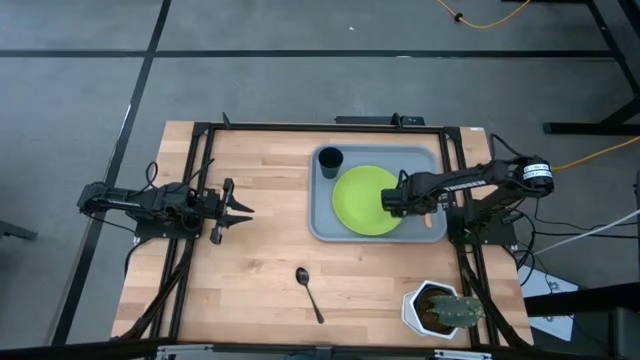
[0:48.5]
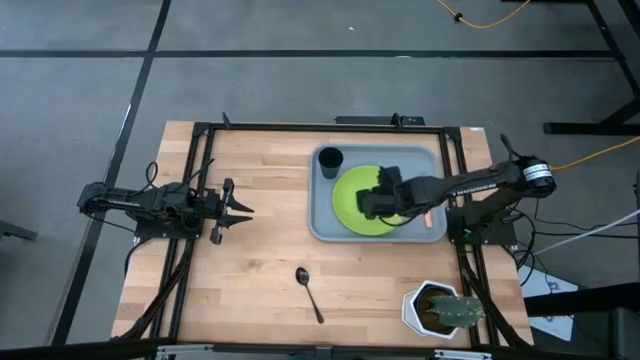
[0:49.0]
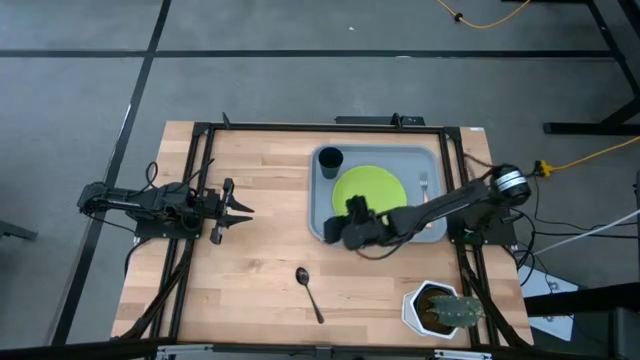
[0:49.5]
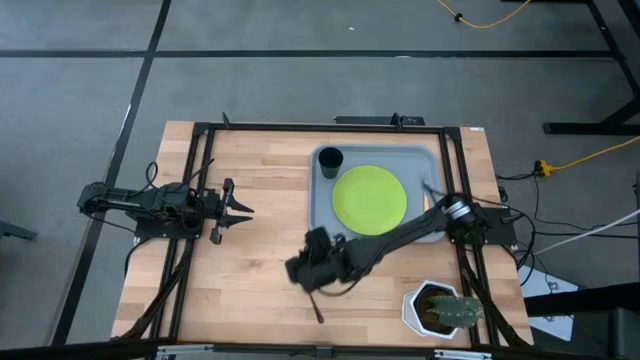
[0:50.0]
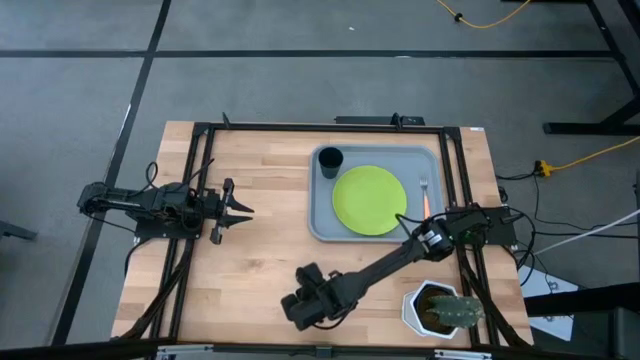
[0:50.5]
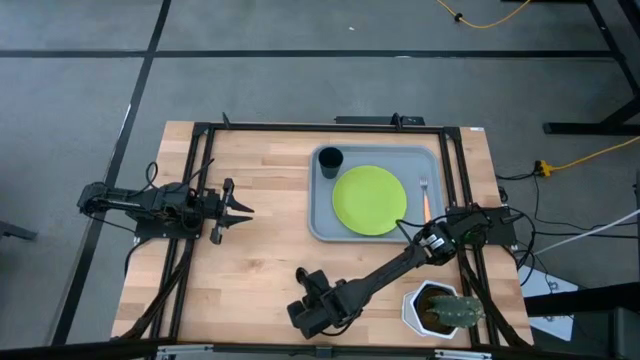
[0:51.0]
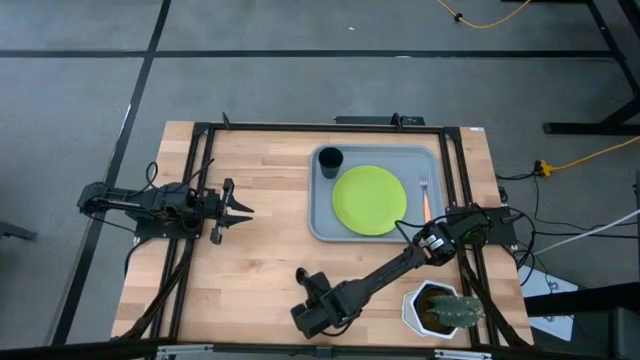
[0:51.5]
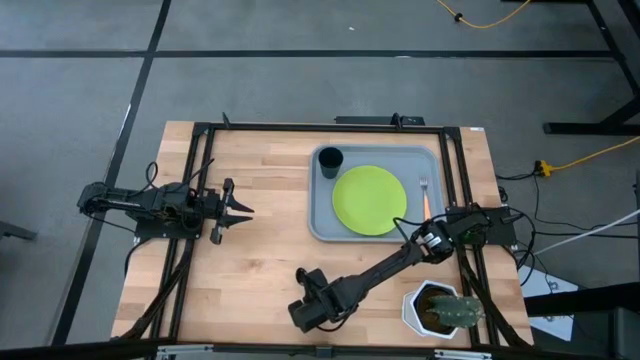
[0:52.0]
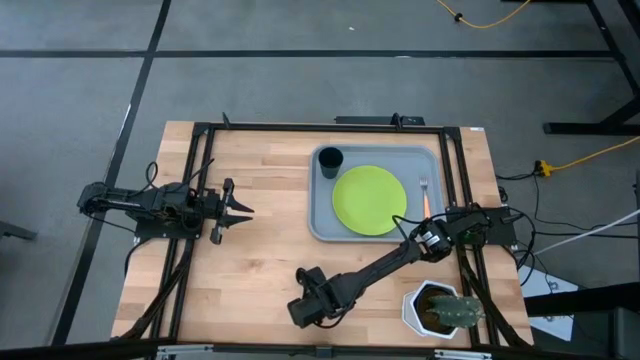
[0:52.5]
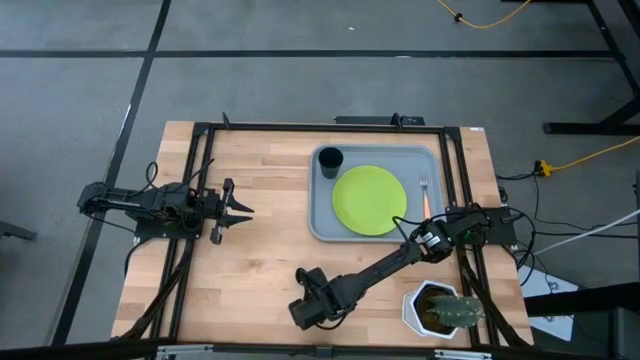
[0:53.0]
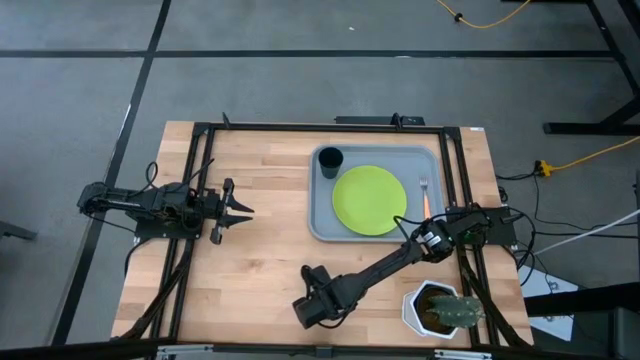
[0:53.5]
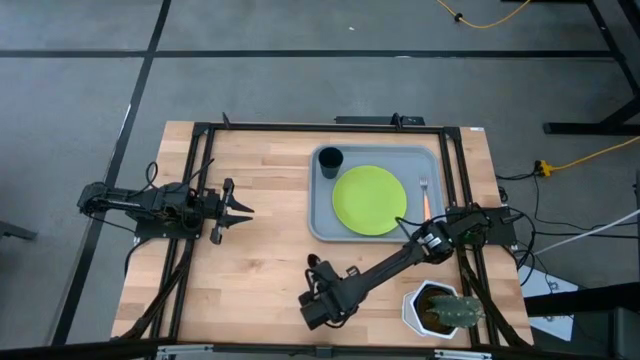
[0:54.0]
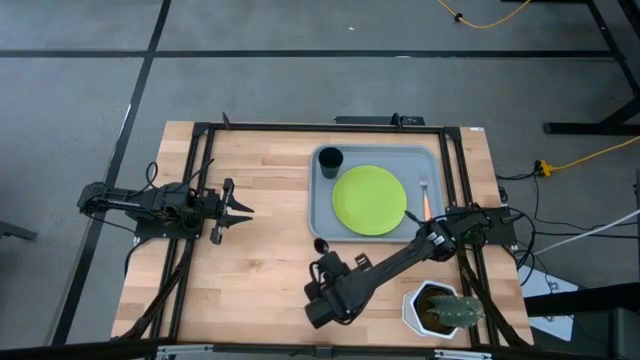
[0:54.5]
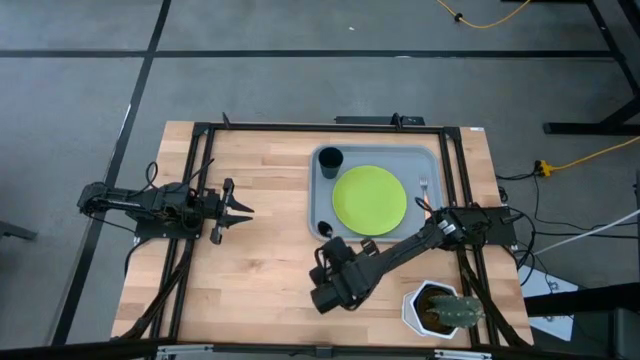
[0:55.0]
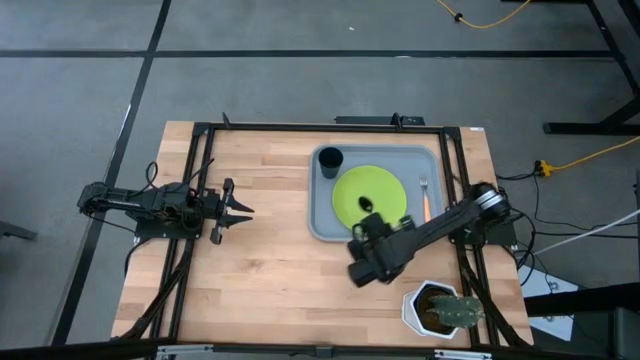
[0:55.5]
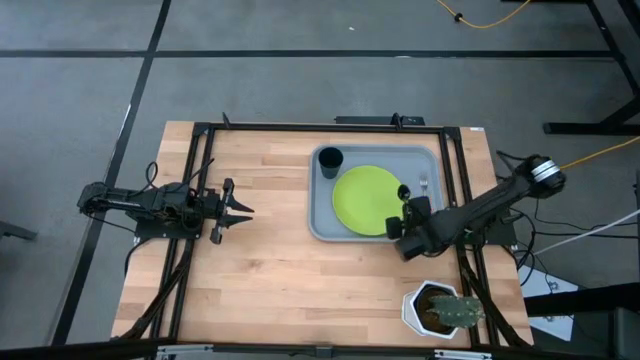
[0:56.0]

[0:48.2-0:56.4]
Task: Pick and place plate/cup/fork/spoon on tray
Put the black spoon on the gray serving tray to the right of the light green plate

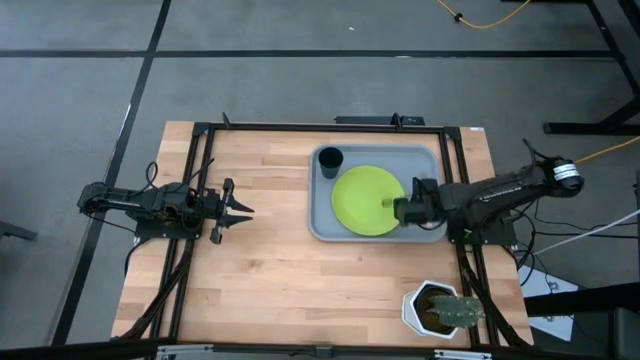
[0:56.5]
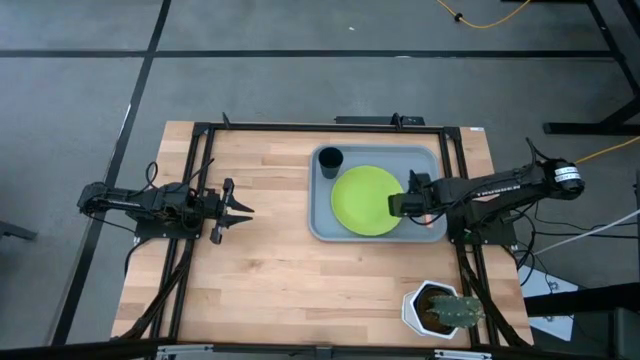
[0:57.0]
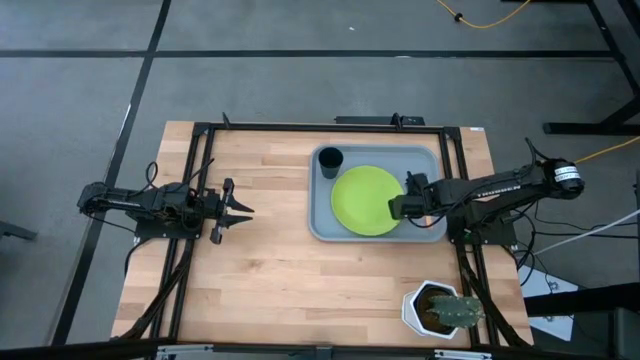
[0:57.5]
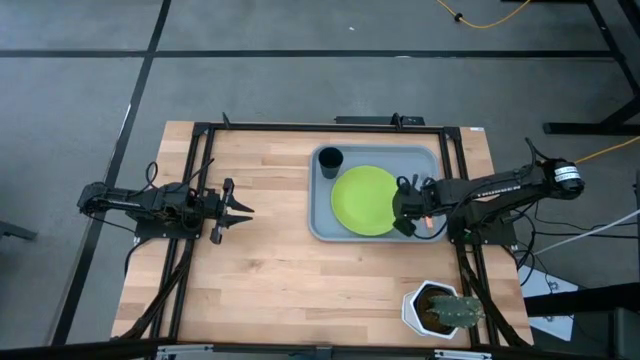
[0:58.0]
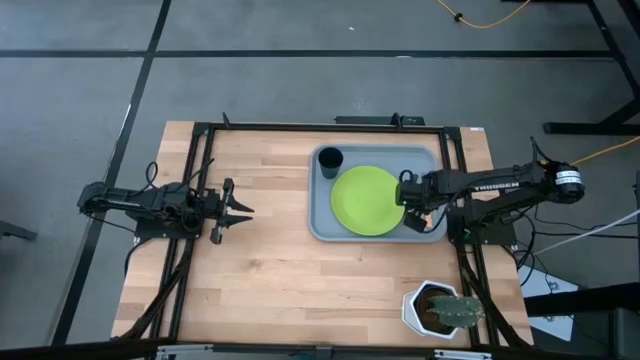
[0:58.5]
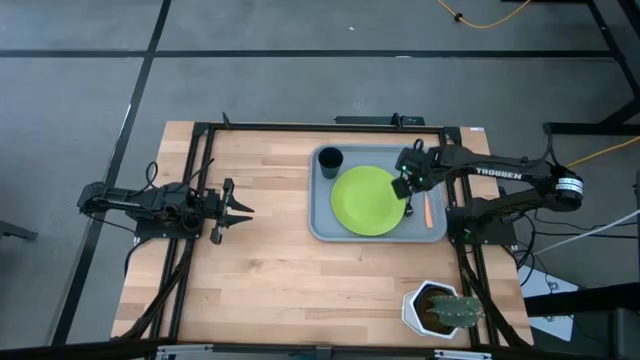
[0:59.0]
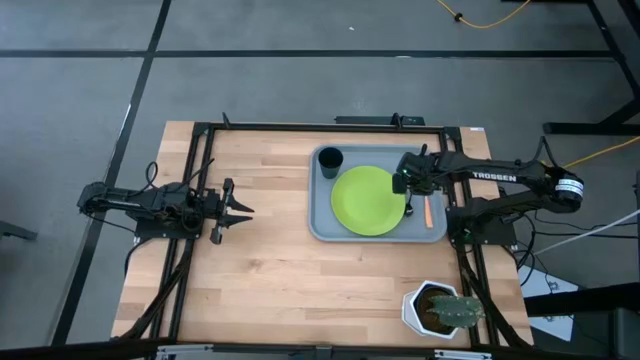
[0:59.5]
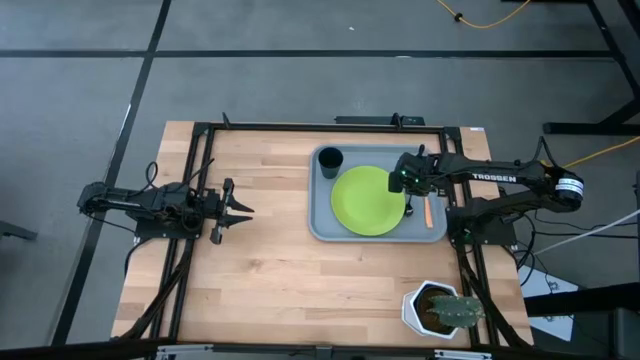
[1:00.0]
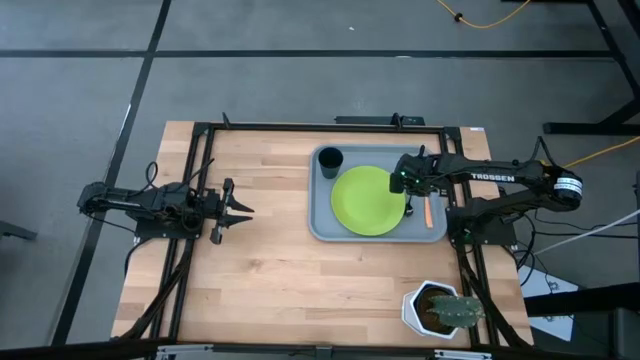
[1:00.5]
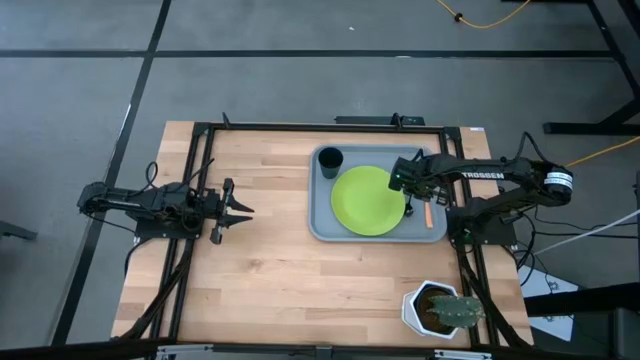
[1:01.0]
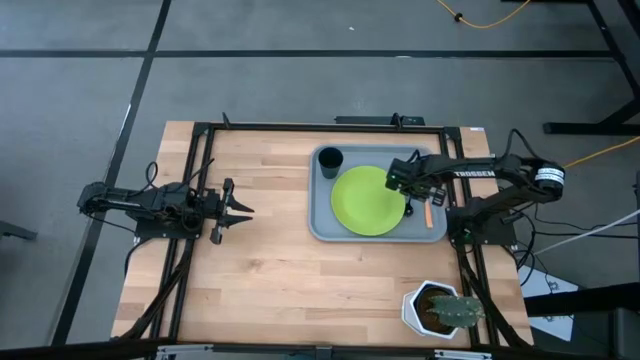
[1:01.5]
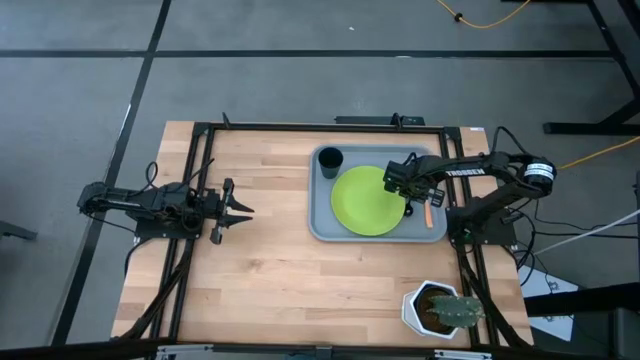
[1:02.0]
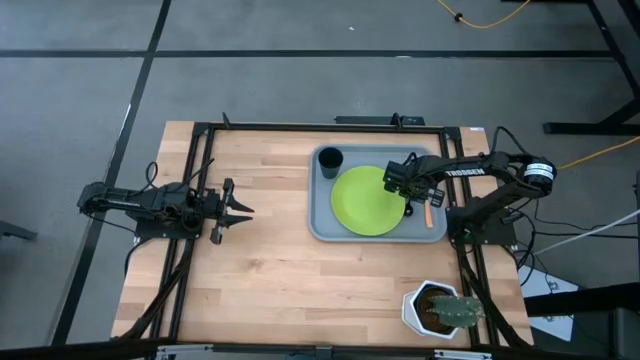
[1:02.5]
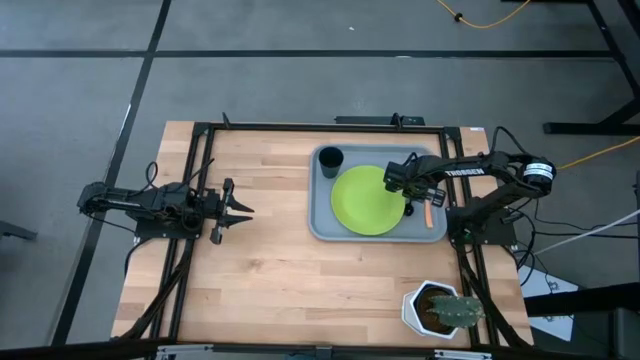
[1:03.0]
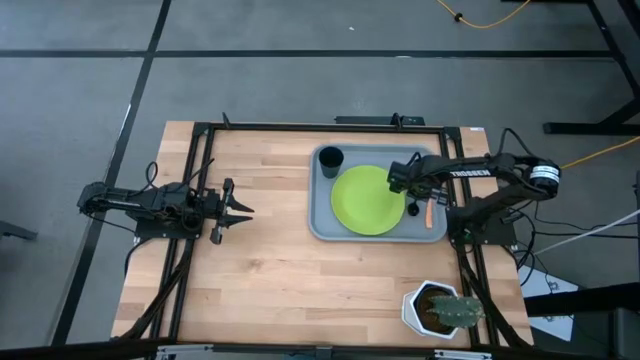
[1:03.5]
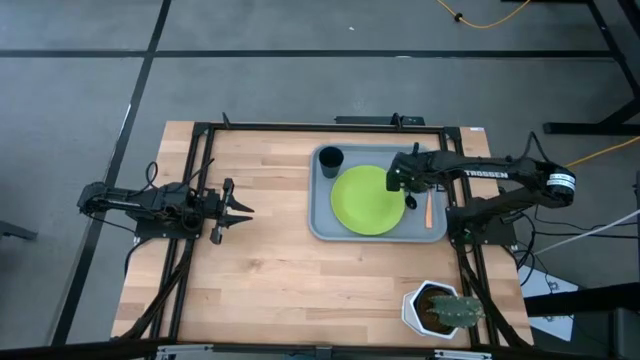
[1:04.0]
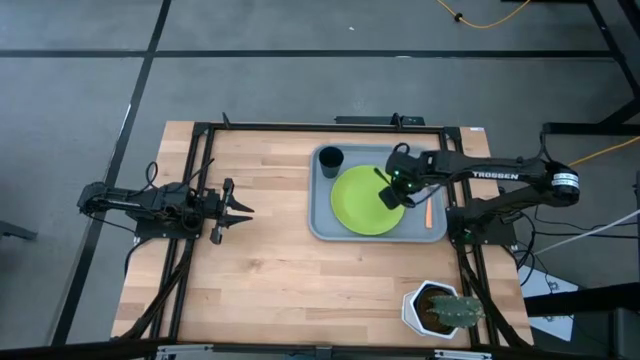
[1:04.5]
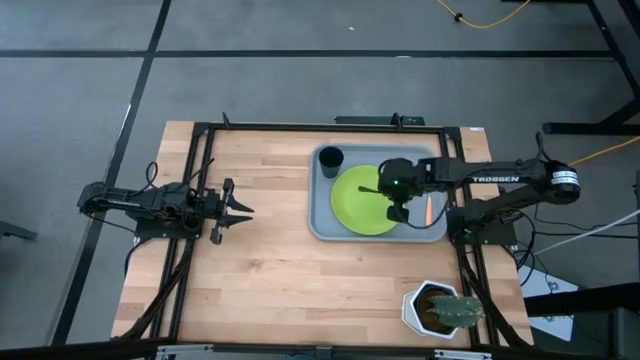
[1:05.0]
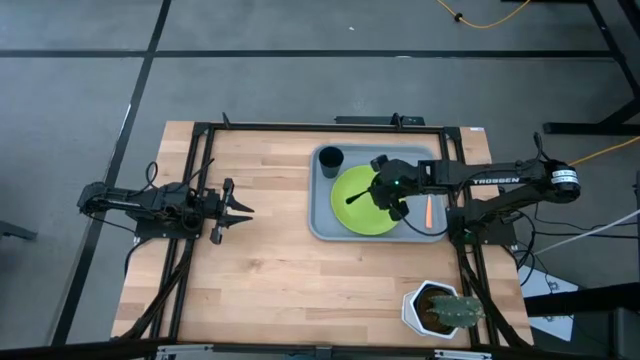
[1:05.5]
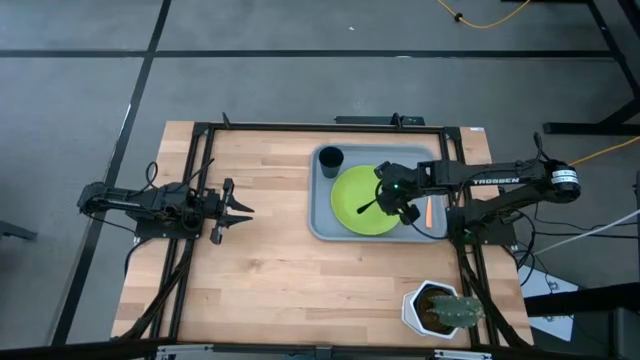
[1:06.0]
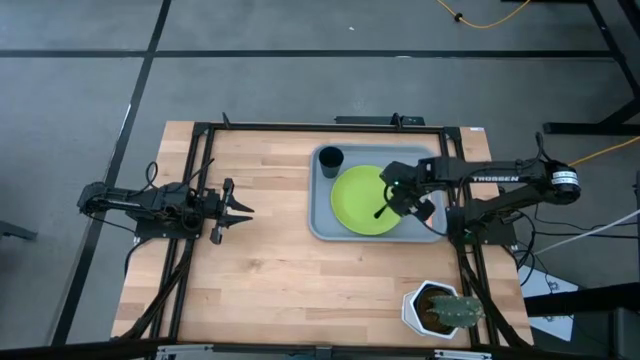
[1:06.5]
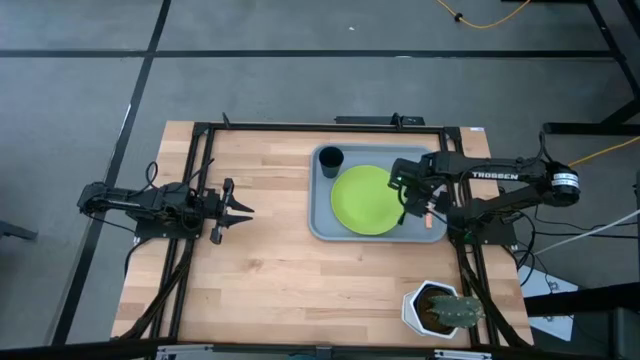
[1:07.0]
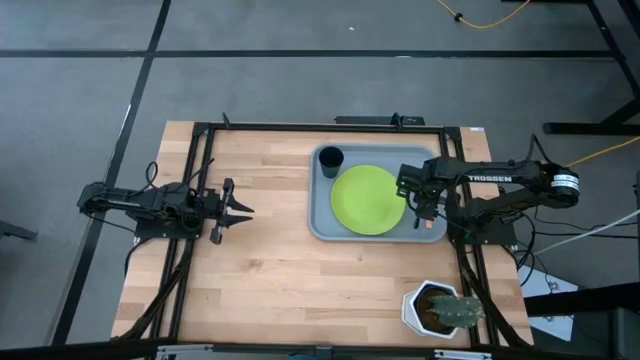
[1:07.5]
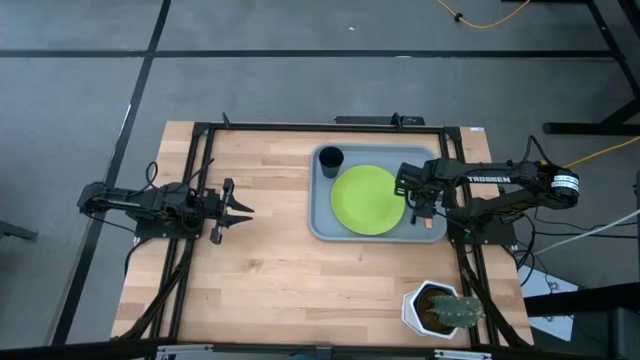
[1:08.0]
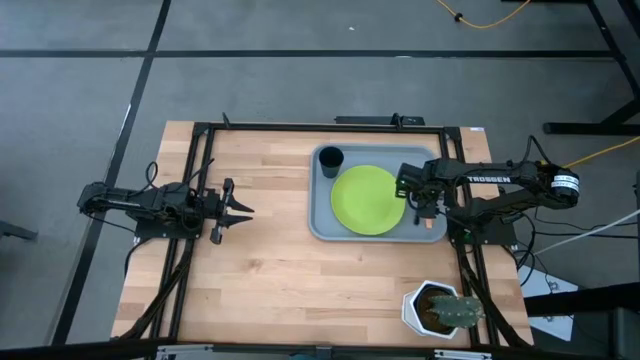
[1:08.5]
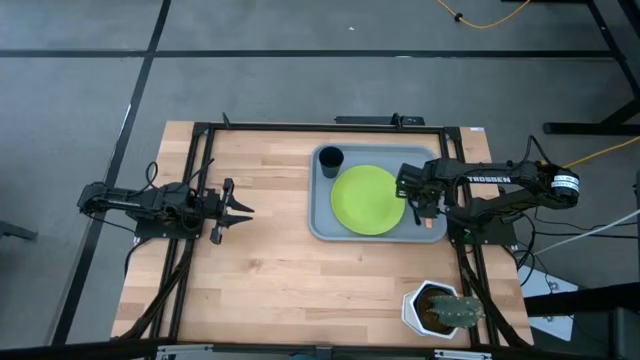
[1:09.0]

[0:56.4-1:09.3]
Put the black spoon on the gray serving tray to the right of the light green plate

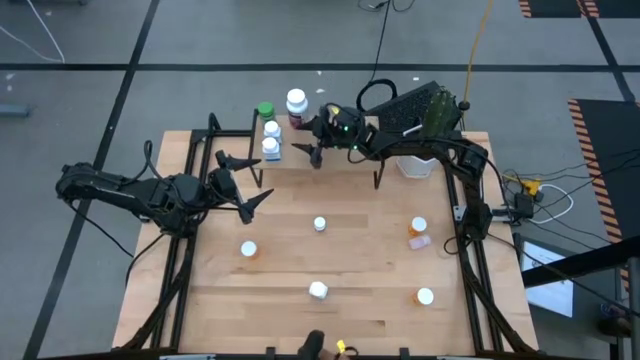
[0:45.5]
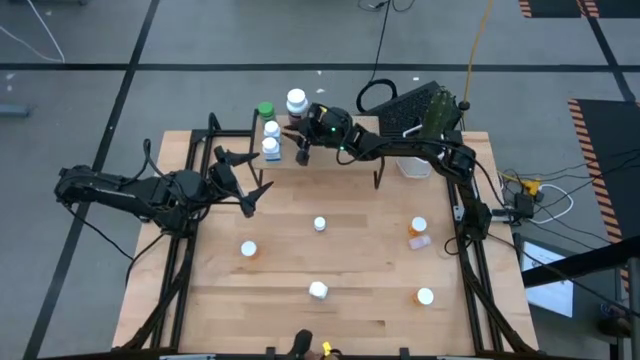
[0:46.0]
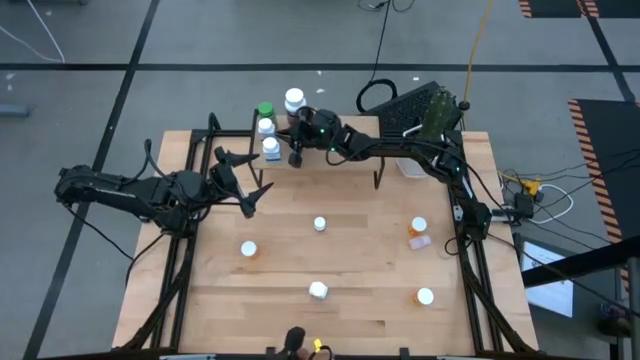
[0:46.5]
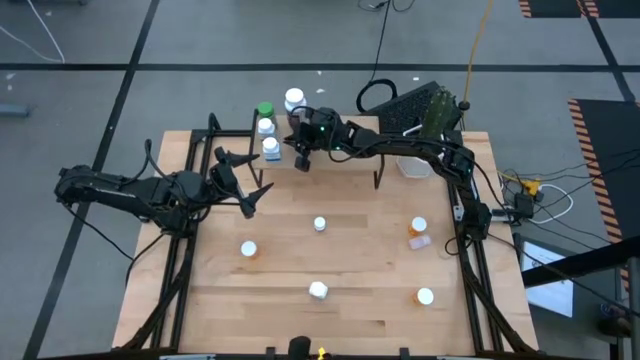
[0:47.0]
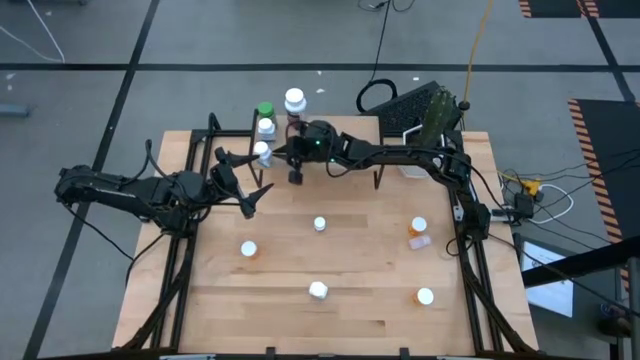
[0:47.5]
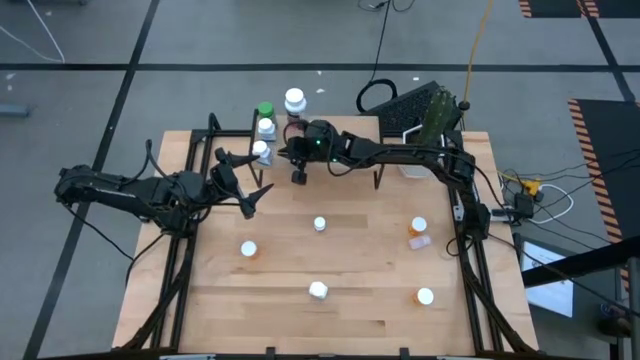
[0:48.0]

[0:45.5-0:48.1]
Task: Pick and place medicine bottles onto shelf by color
Adjust the medicine bottles on the shelf
